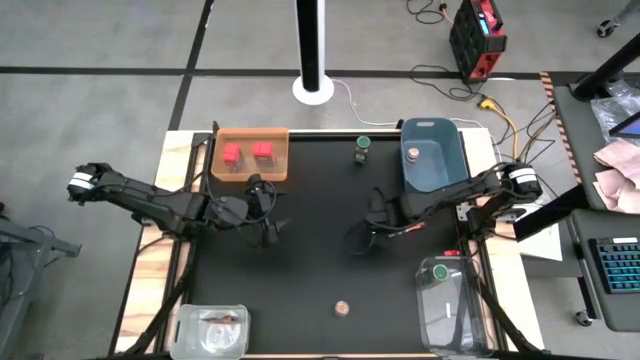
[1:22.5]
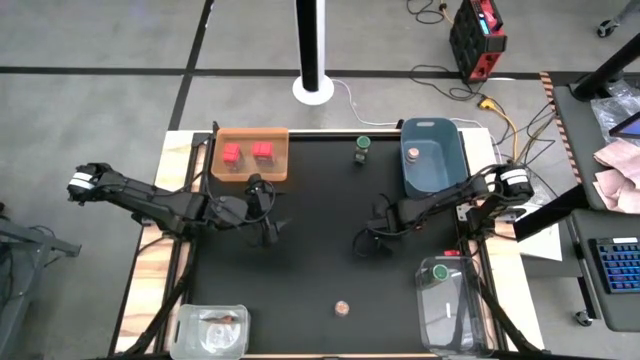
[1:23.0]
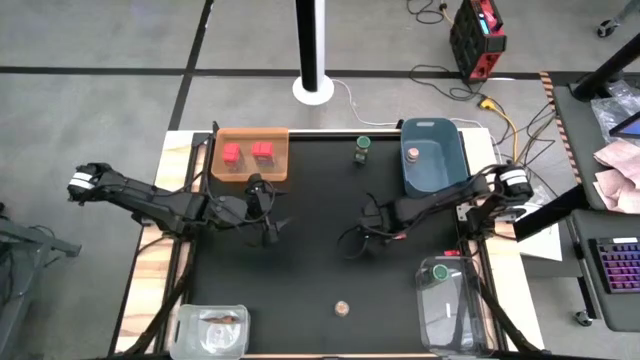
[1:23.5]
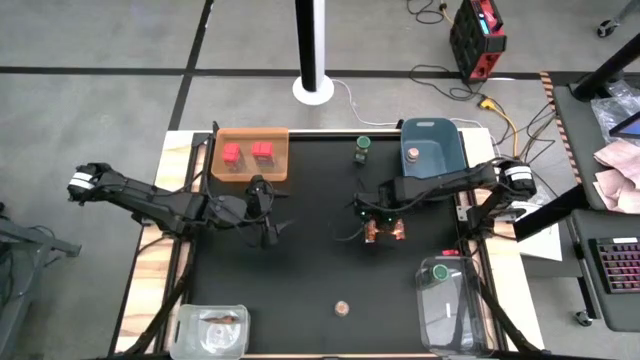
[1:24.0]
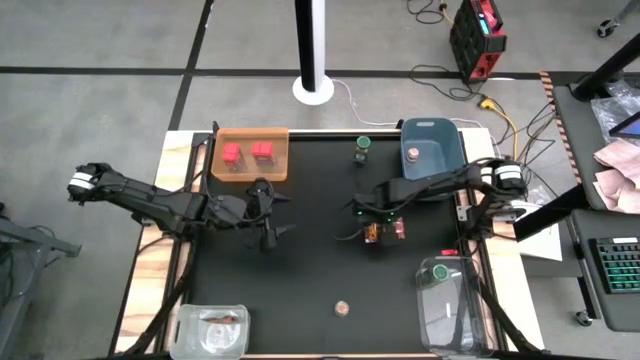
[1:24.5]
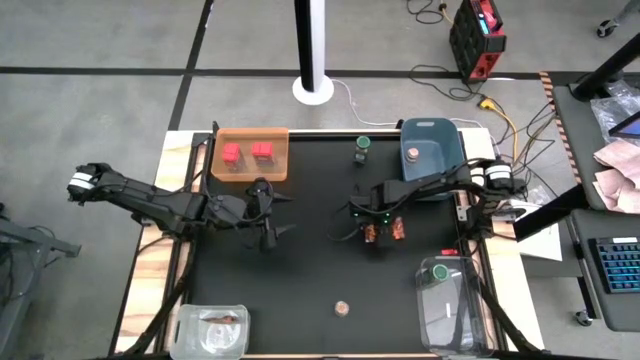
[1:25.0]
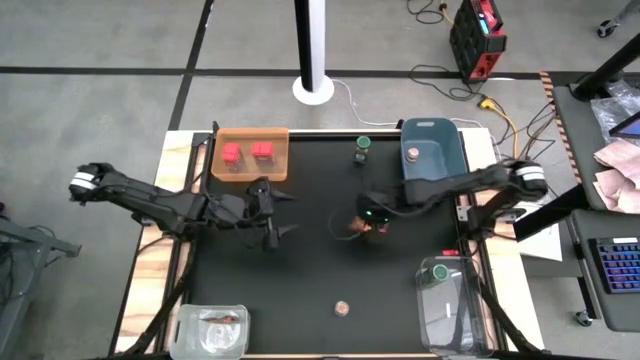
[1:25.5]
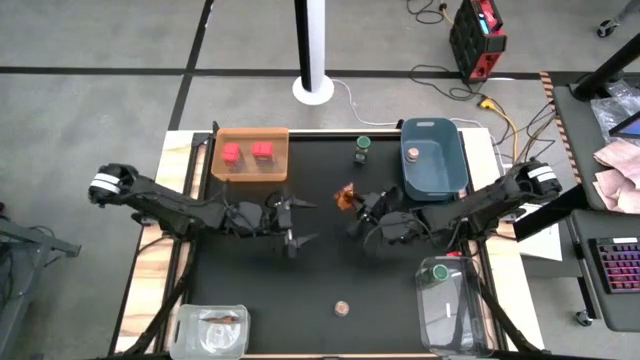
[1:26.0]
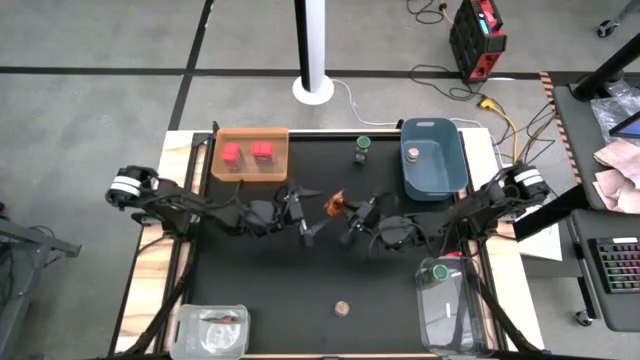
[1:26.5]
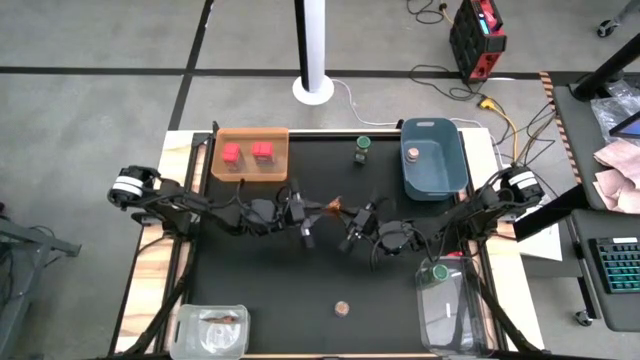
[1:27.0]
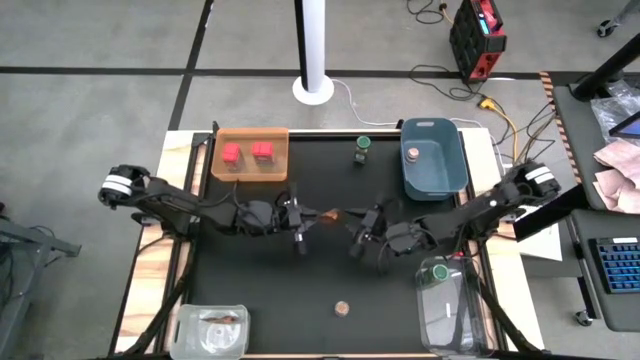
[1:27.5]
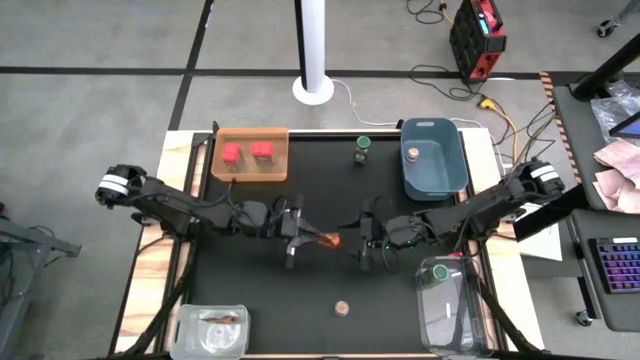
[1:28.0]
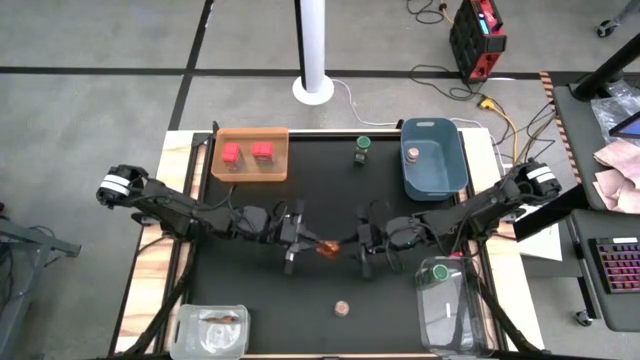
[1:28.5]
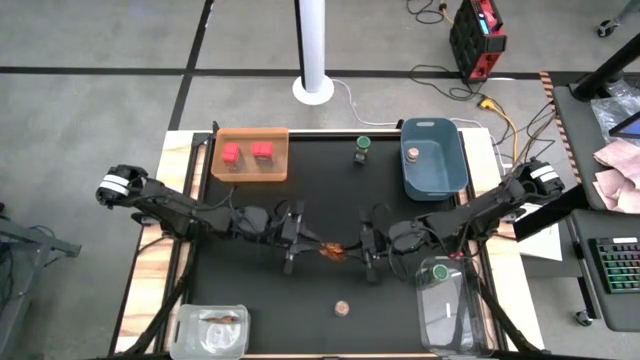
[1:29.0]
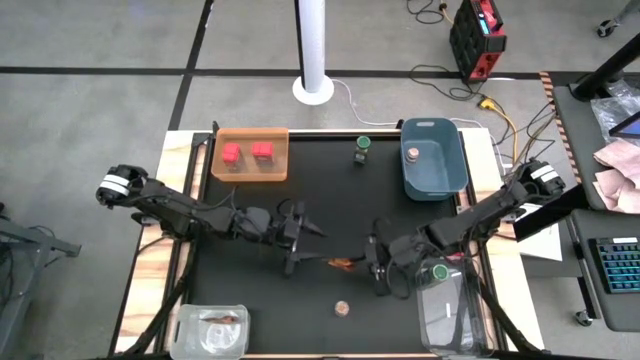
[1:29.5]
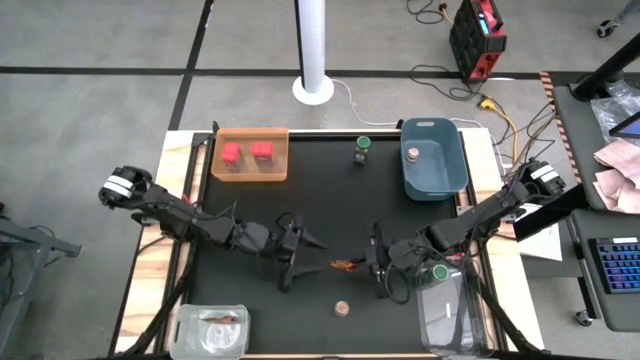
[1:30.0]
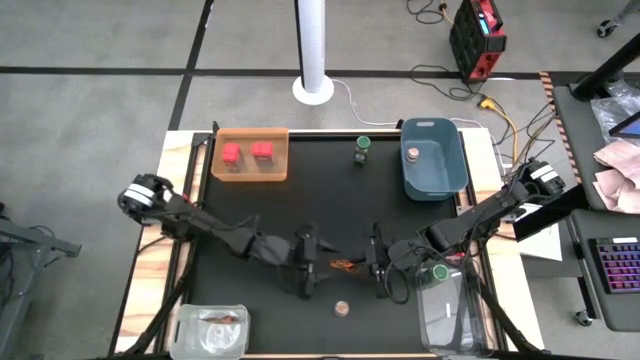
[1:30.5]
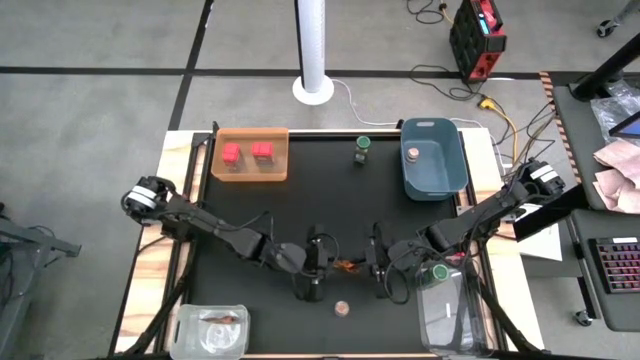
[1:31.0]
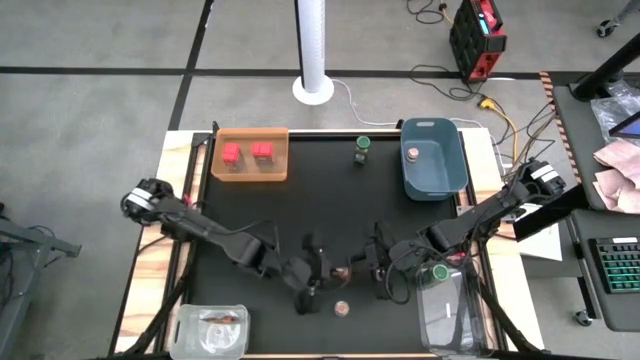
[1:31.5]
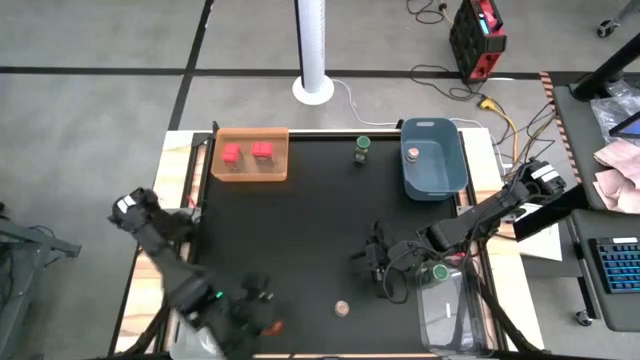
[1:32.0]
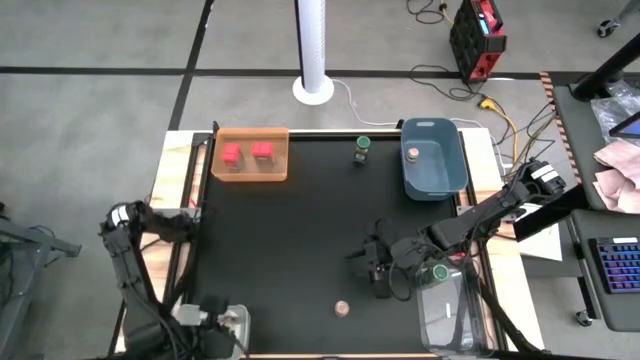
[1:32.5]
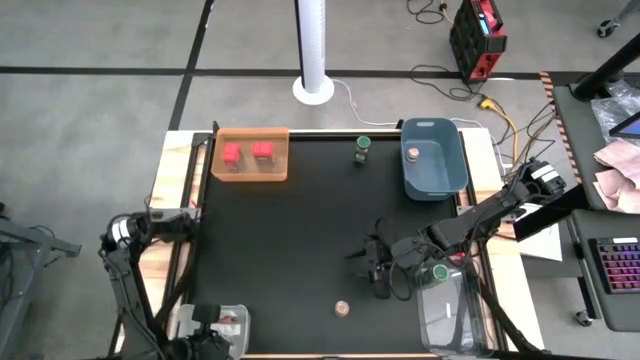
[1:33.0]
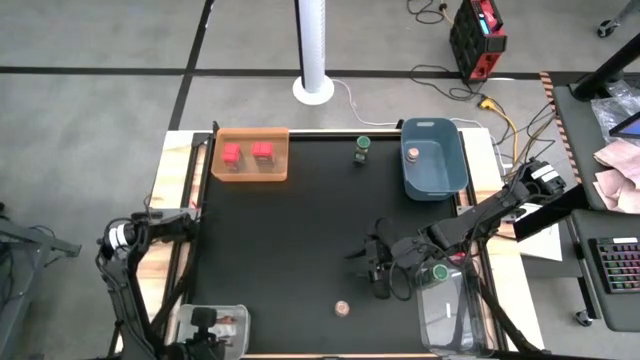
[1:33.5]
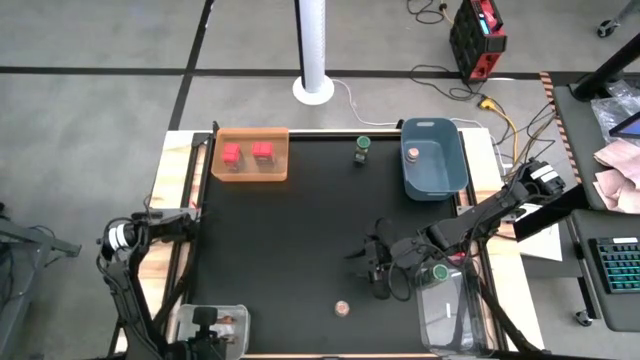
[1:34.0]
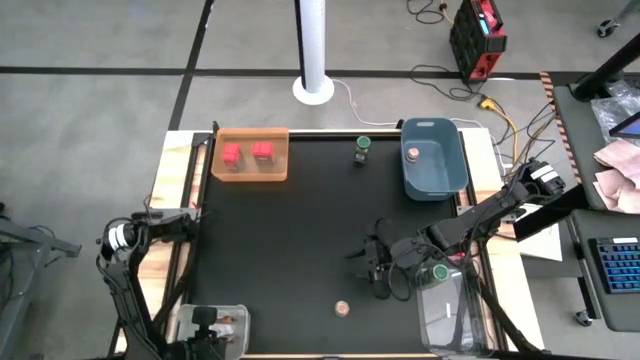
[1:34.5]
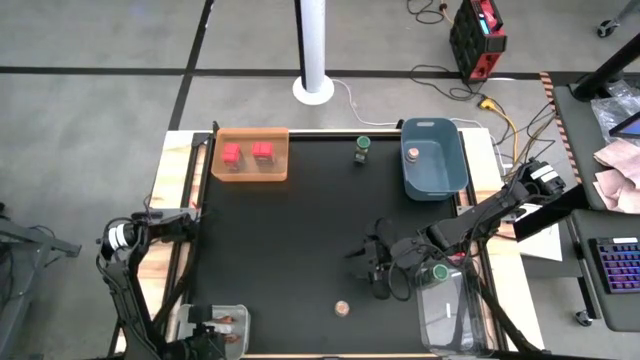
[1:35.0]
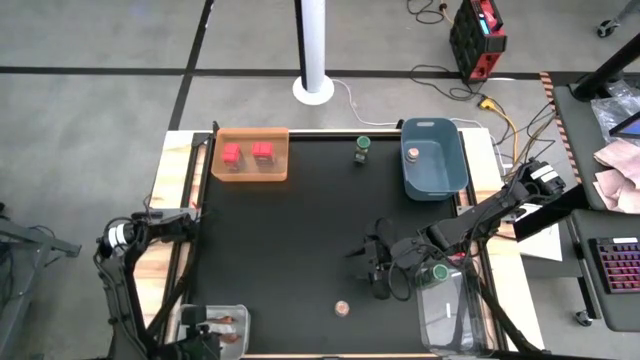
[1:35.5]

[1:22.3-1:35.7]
Task: Sort spices by type
Put the orange seasoning bag into the white bin

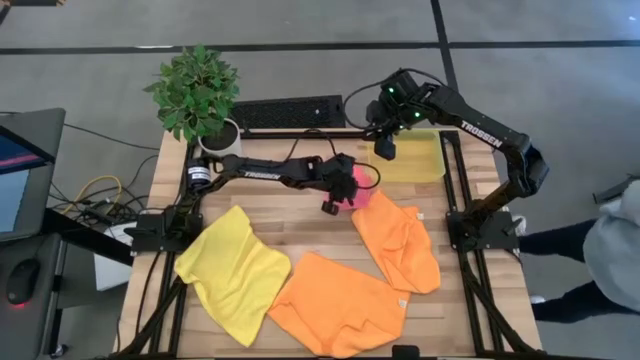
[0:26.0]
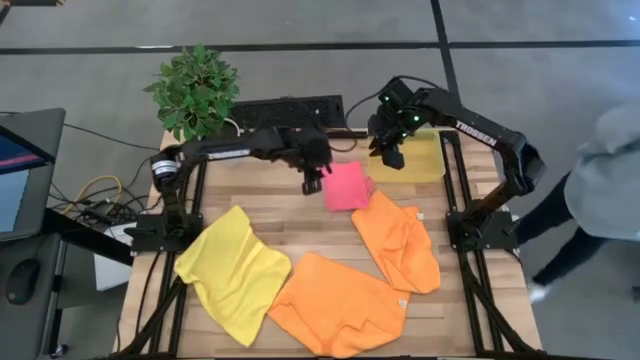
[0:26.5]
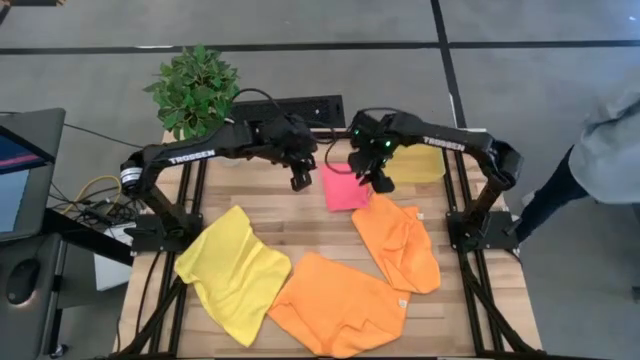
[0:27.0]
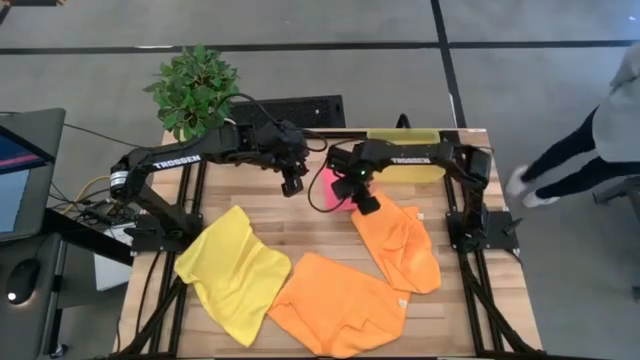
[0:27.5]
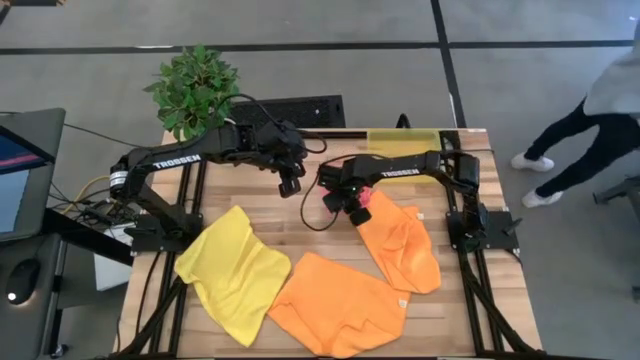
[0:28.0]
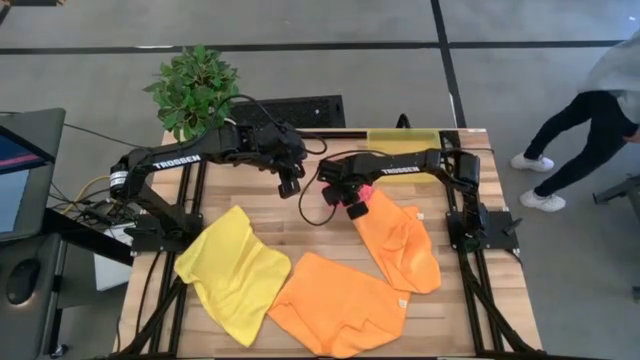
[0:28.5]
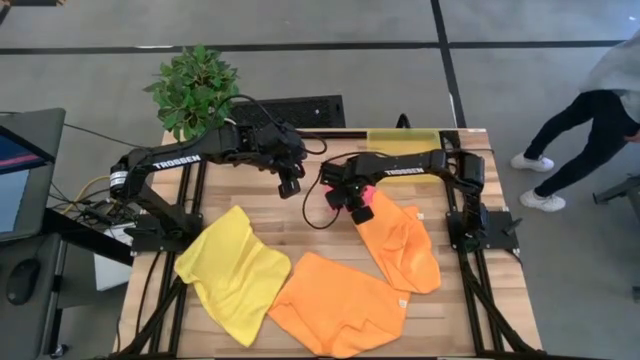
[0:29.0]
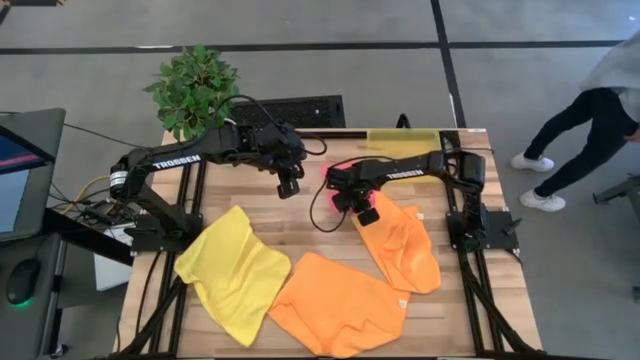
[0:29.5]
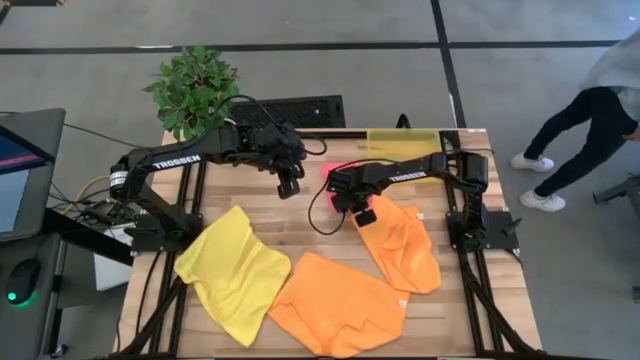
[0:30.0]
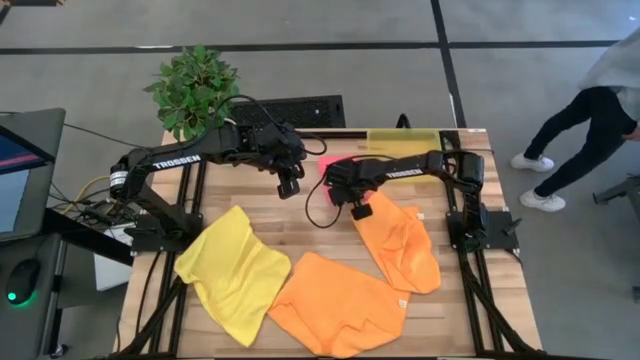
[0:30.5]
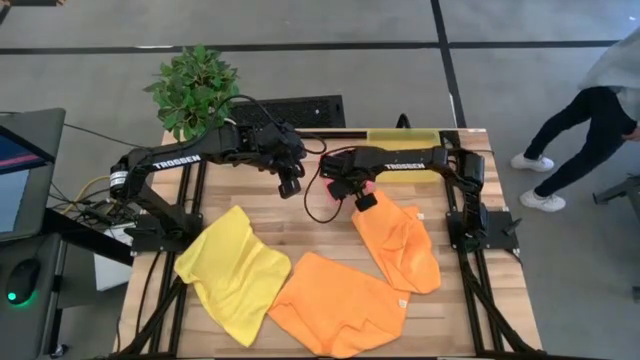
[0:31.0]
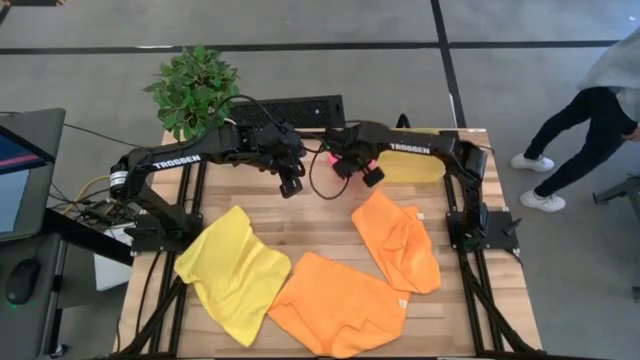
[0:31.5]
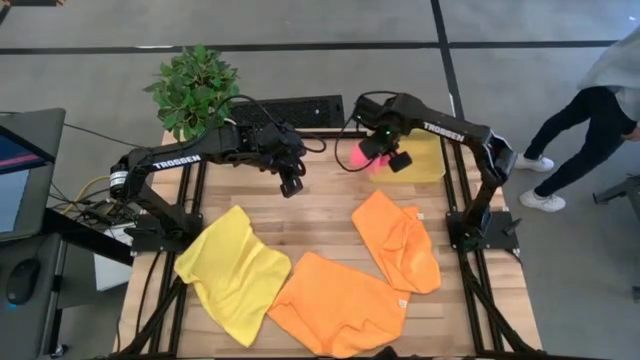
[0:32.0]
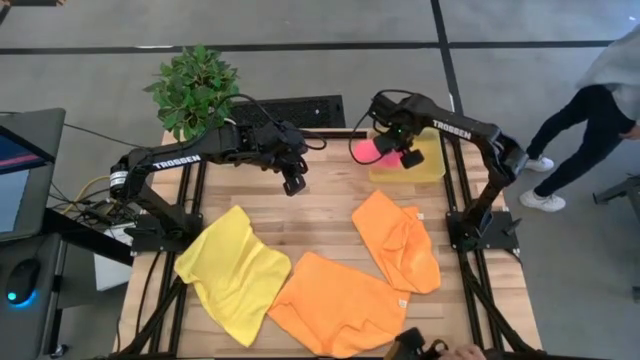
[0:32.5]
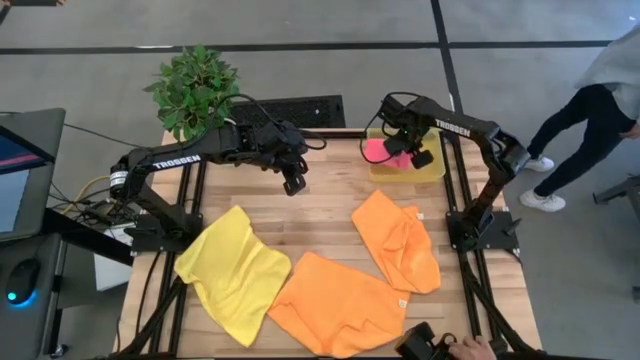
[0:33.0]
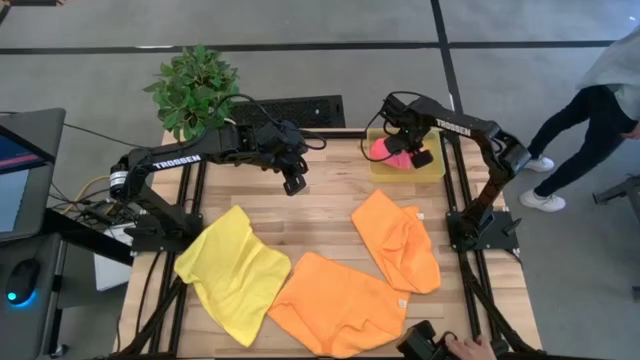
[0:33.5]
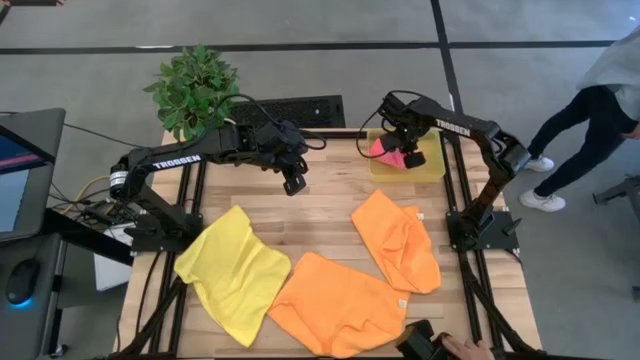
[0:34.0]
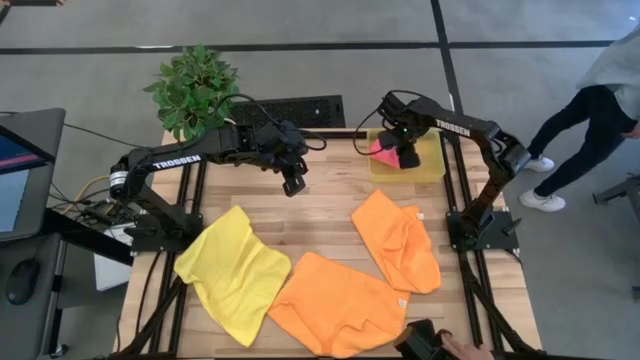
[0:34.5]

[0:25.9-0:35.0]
Task: Fold microfiber towels
Put the folded pink microfiber towel into the yellow bin
